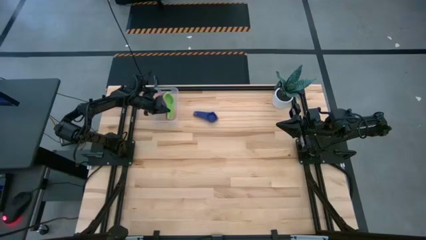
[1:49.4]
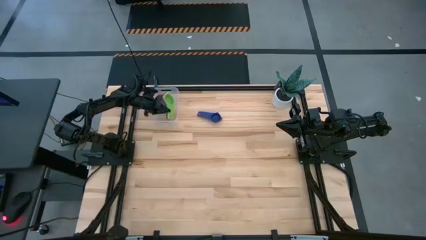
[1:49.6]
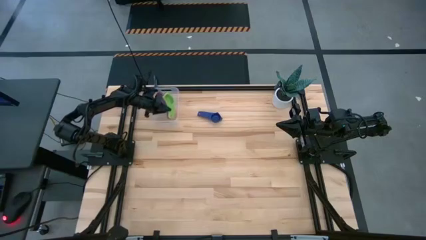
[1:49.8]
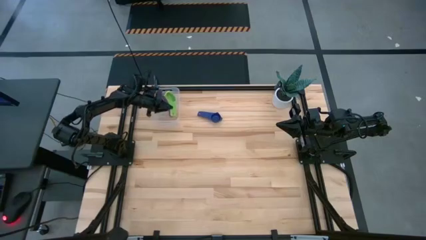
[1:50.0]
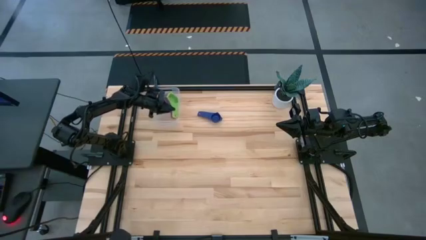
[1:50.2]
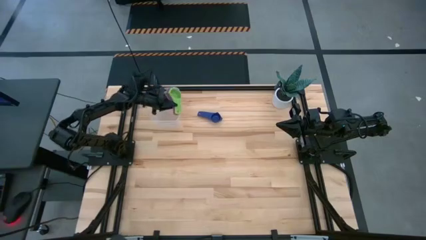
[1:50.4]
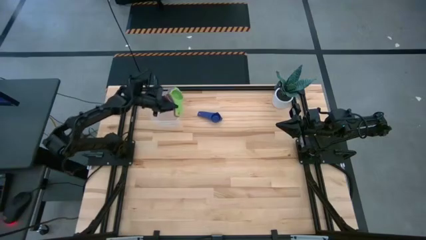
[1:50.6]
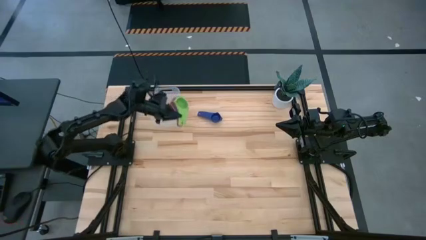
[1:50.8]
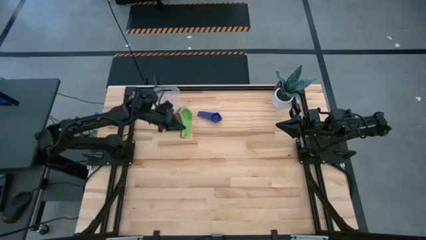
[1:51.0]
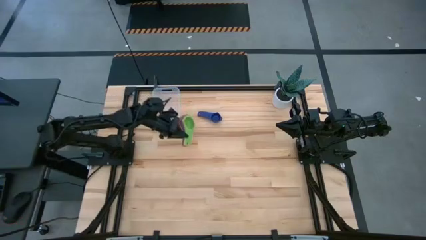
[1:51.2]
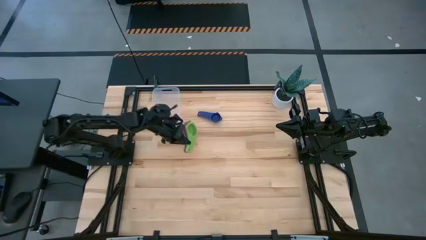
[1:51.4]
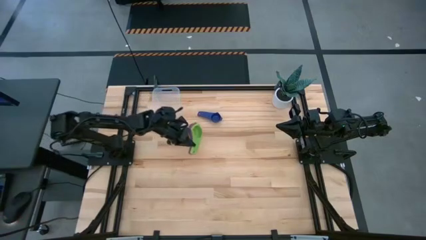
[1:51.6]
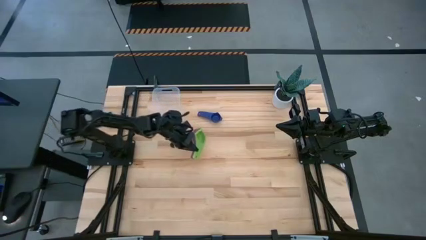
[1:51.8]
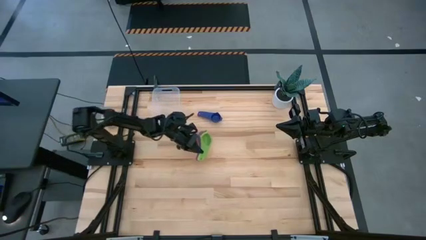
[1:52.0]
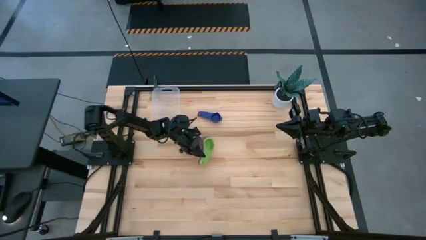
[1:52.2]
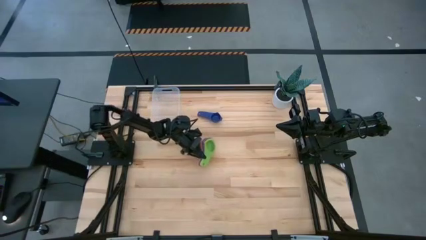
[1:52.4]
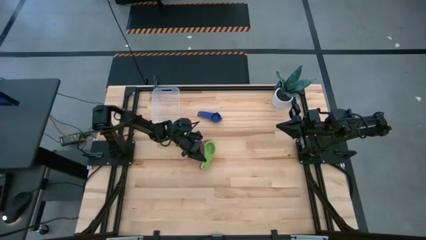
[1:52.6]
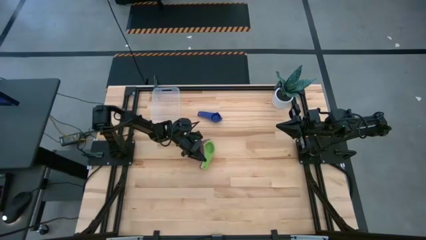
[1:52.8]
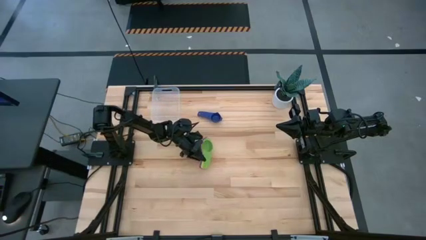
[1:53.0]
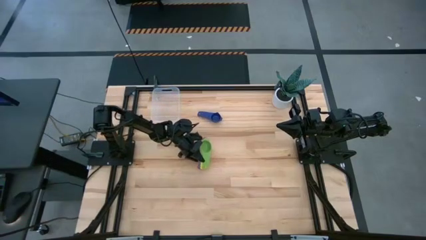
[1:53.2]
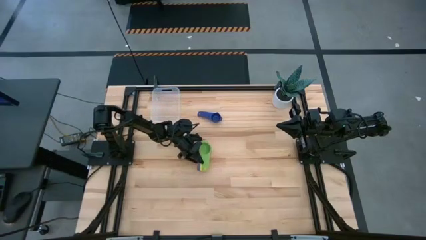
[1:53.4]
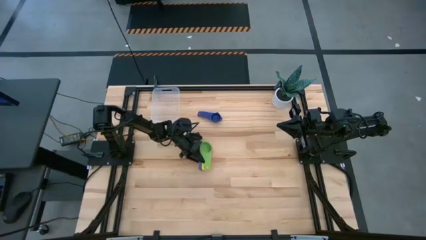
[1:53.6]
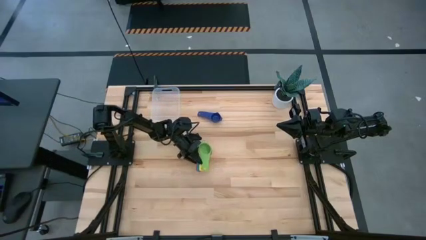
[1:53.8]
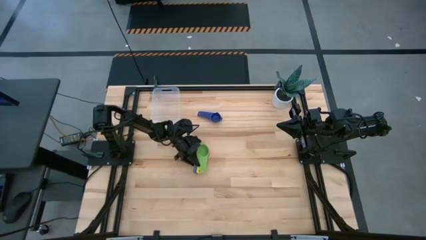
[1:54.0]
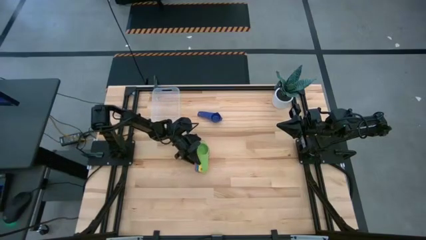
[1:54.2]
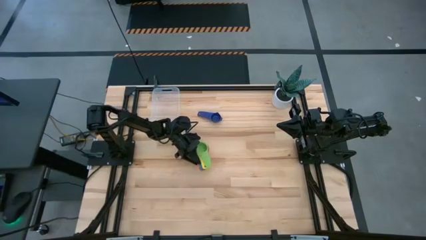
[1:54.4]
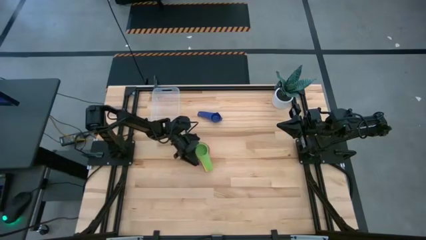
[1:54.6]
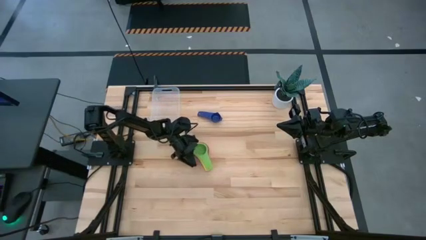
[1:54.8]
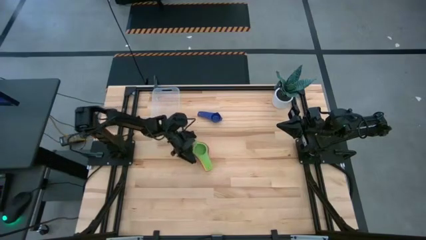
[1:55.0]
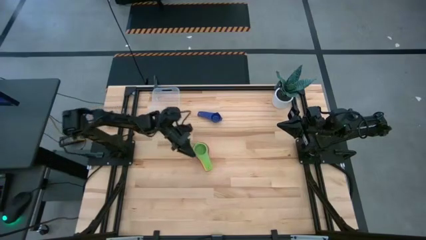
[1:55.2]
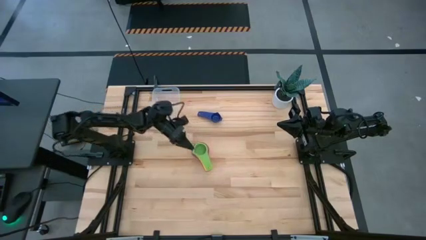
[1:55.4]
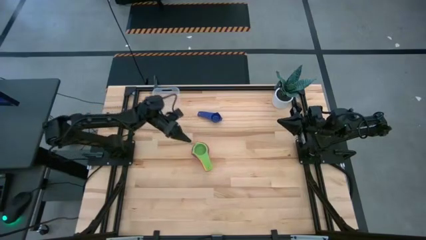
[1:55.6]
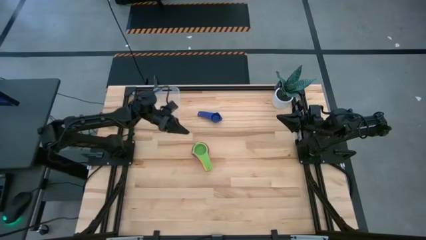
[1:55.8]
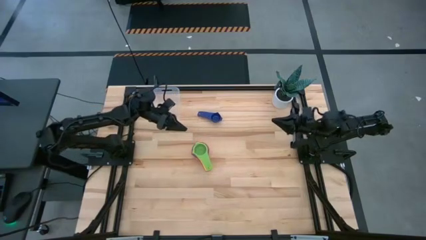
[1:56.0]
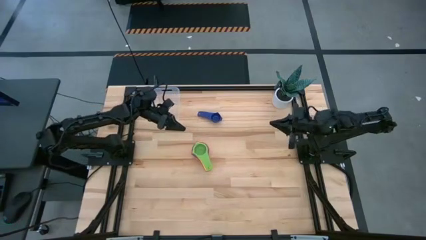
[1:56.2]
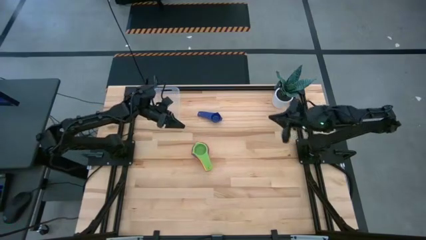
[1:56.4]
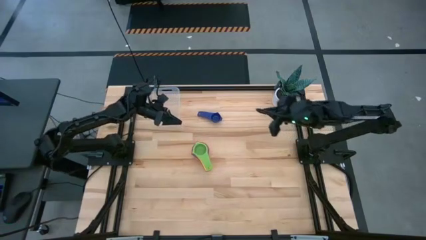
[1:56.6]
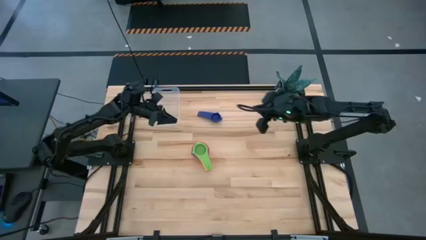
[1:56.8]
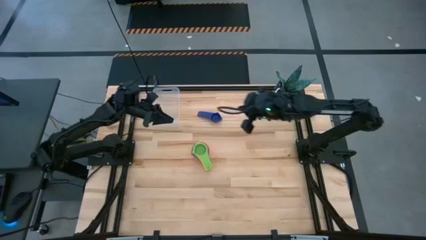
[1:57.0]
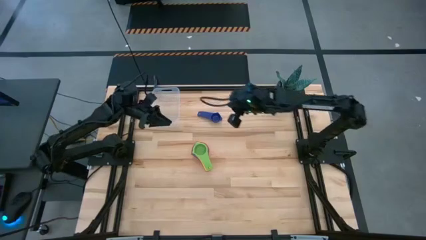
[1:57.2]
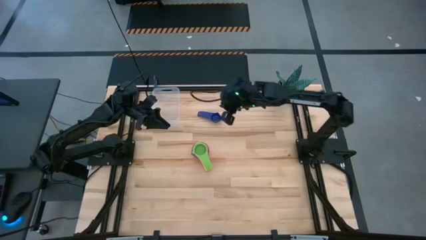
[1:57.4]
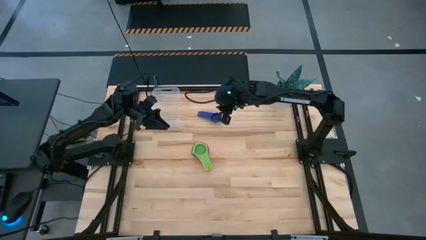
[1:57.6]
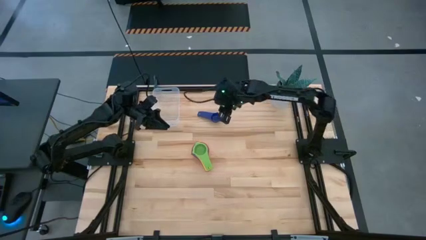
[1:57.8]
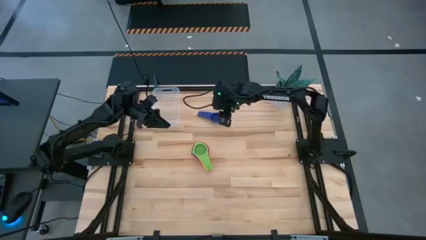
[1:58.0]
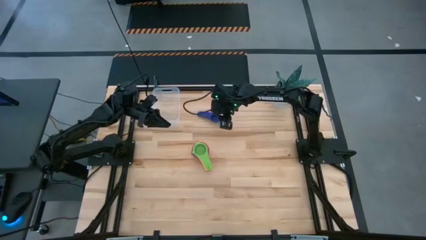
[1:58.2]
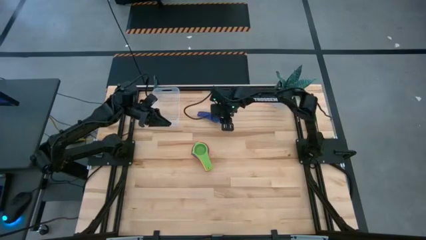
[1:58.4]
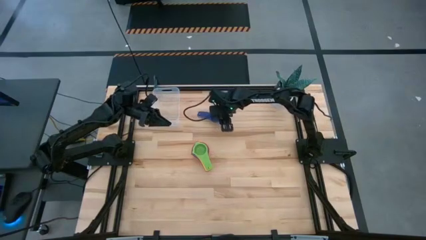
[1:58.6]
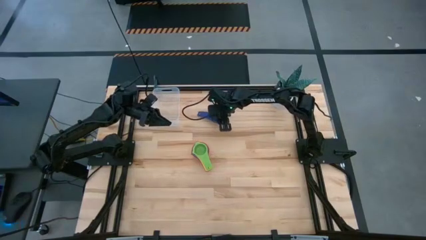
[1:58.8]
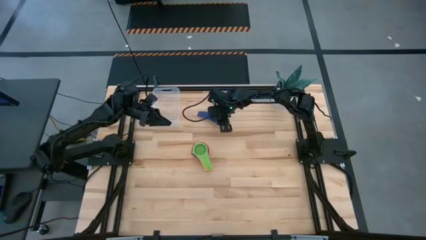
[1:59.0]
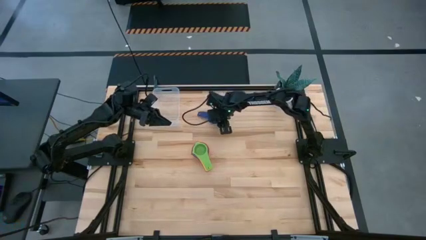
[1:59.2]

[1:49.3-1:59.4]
Task: Nest measuring cups in basket
Stack the blue measuring cup on top of the green measuring cup

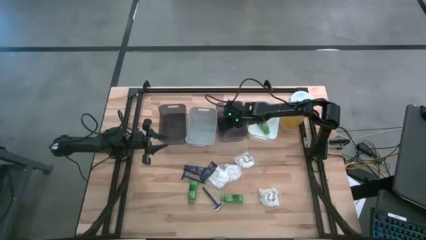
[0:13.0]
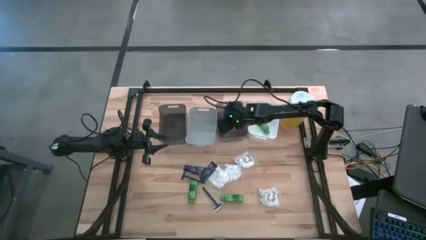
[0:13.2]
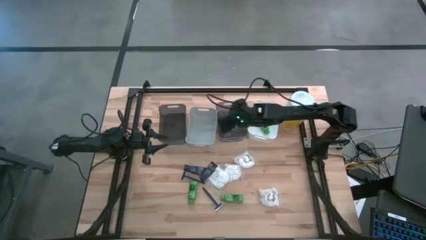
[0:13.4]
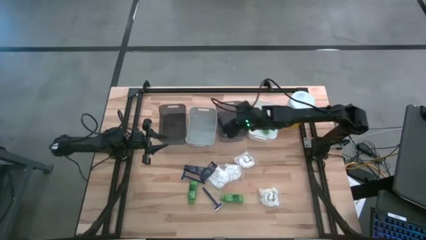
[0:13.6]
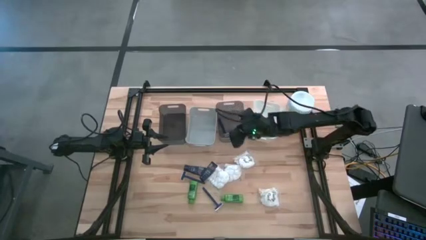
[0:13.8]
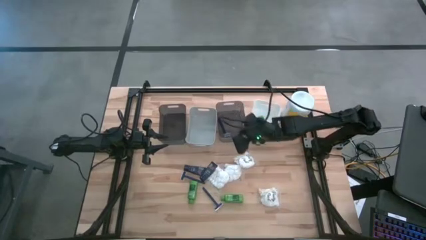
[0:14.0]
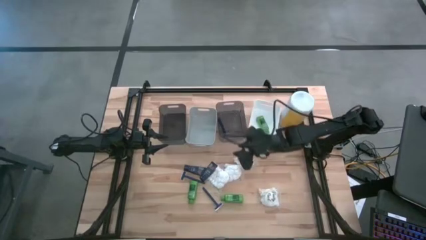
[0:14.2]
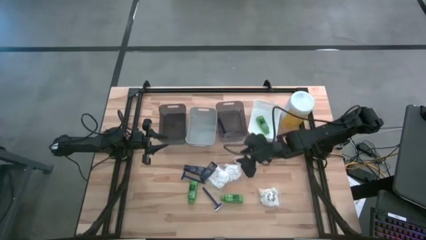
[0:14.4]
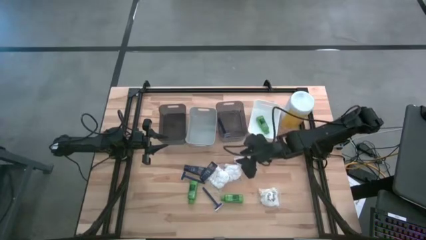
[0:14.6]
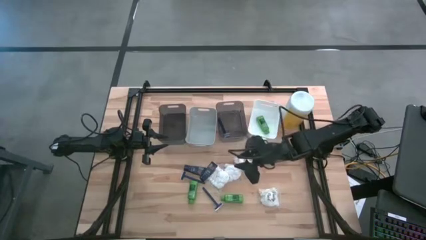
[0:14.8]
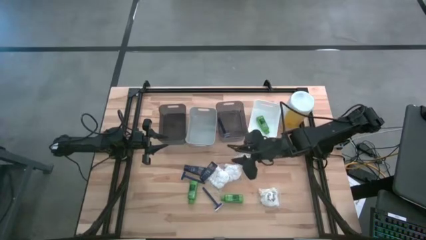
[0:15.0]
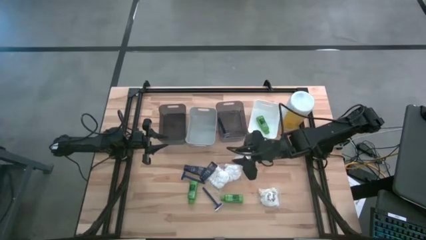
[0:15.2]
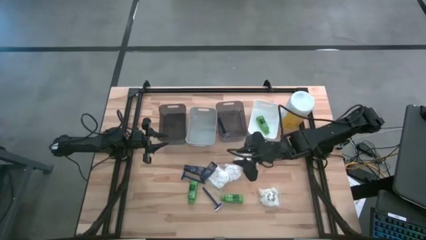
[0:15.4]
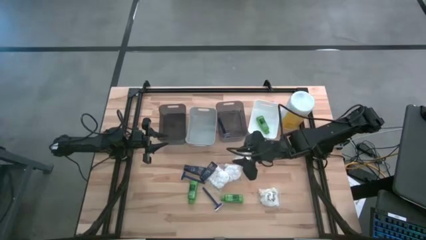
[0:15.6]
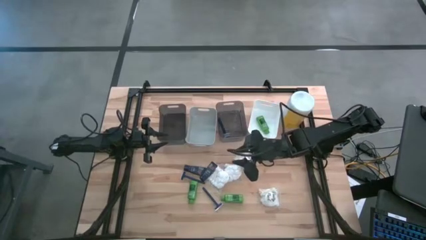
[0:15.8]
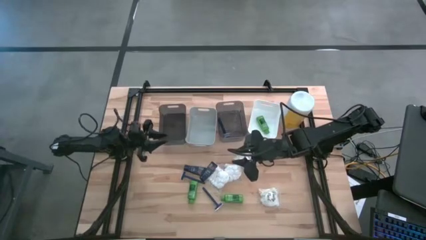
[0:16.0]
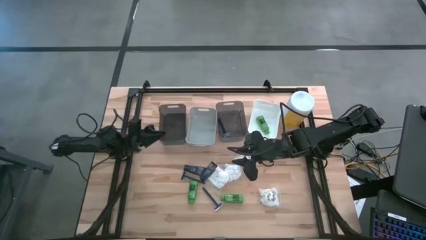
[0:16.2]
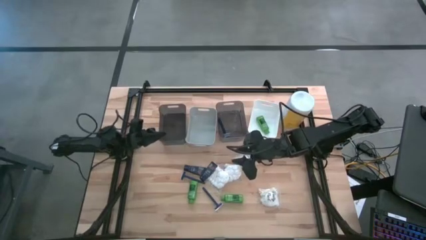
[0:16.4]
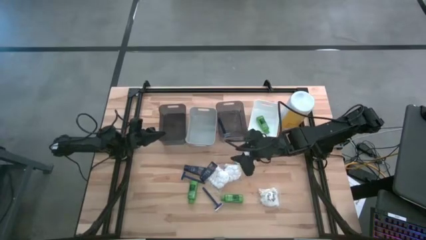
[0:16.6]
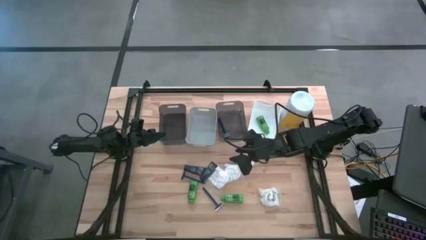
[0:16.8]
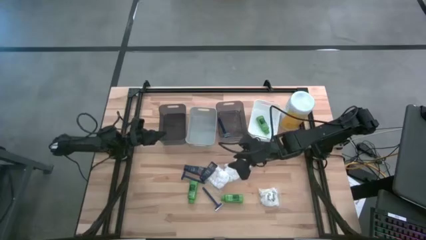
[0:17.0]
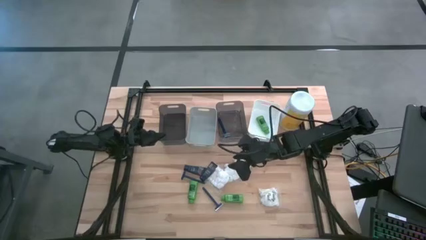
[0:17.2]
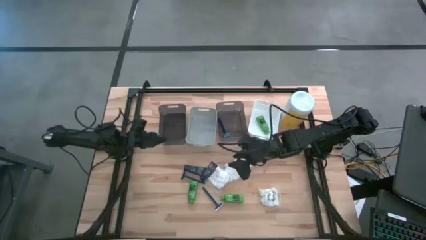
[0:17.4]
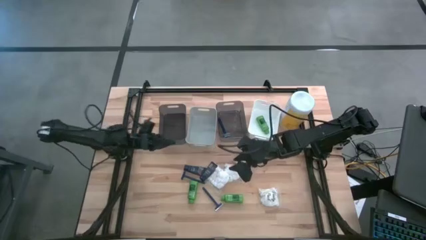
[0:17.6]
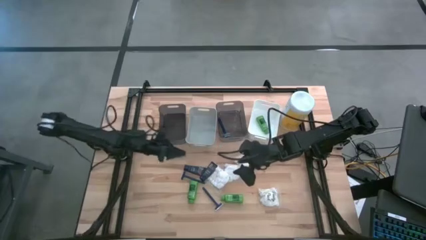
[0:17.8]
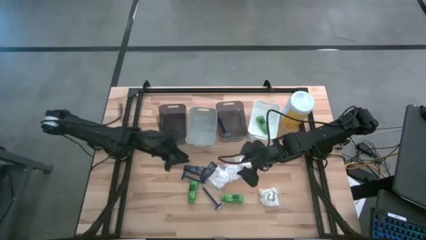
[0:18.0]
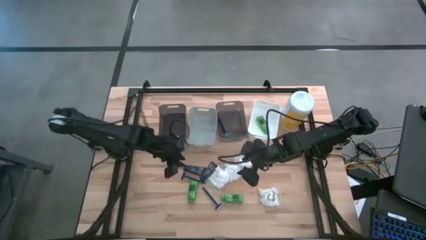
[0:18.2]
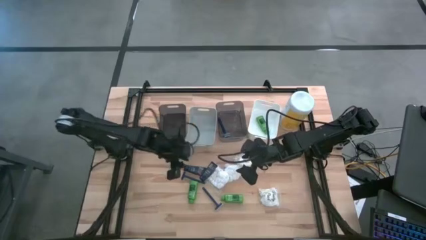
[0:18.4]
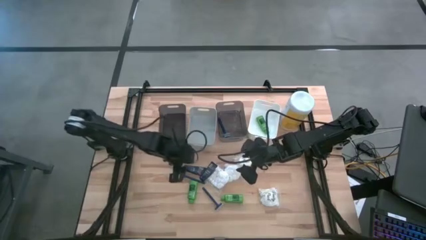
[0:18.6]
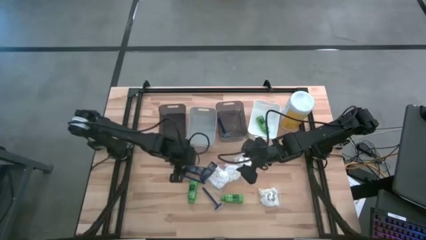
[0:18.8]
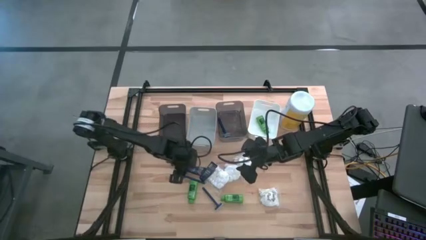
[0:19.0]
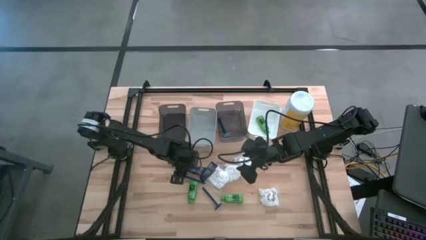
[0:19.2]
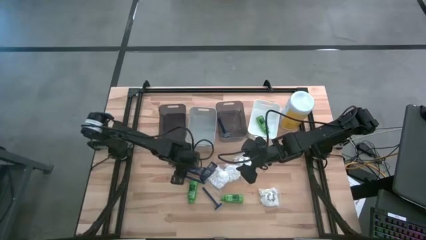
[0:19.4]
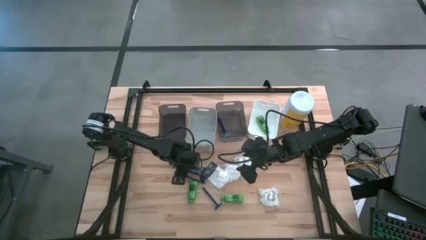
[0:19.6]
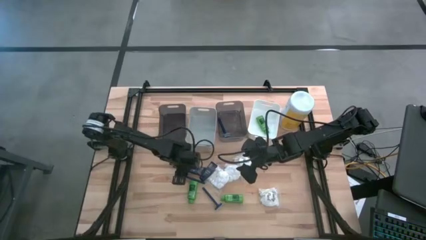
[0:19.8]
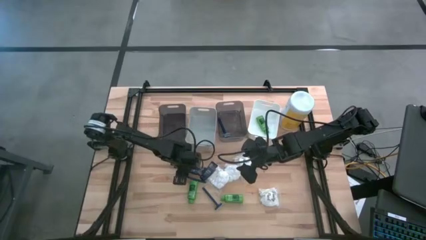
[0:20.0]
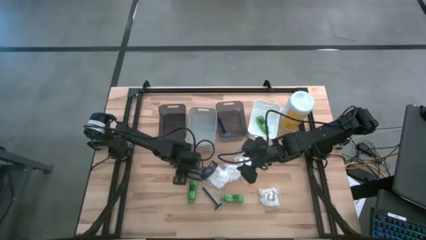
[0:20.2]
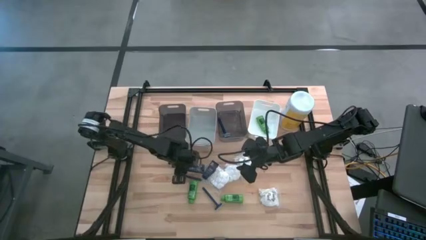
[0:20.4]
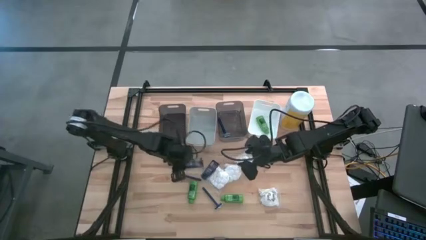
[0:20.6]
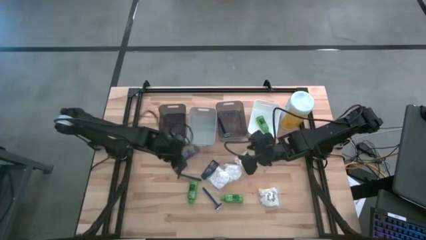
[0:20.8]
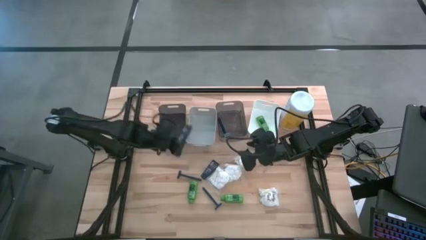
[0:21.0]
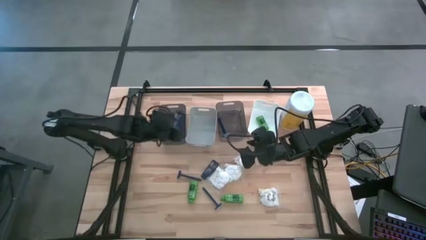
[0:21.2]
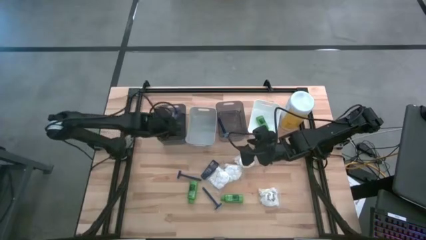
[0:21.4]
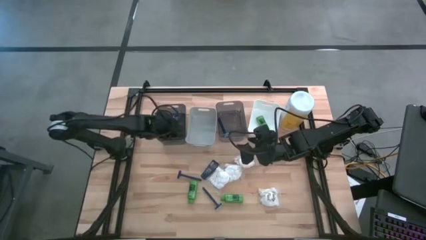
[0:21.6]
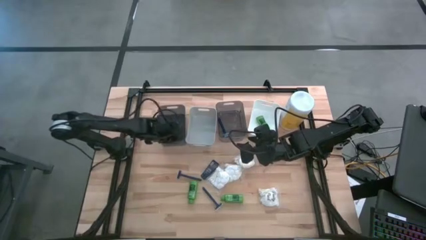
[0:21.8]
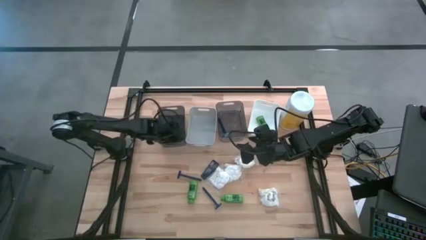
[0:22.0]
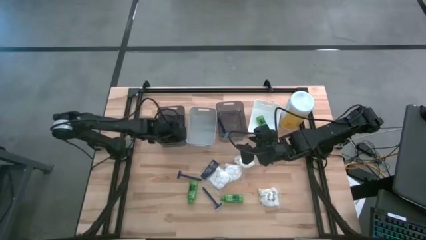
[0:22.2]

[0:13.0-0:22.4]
Task: Pick & Place Travel size toiletries
Put the blue shave cream into the left black bin
